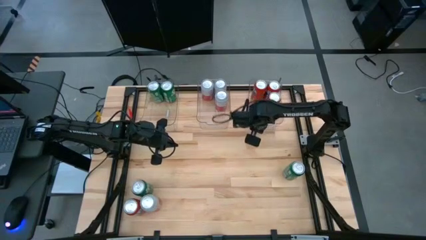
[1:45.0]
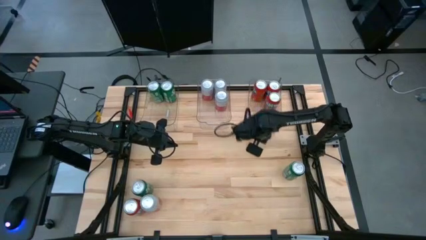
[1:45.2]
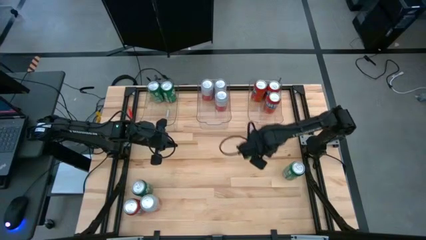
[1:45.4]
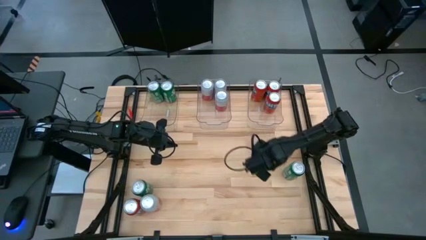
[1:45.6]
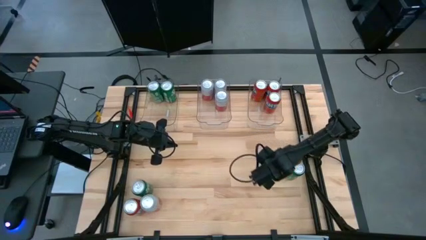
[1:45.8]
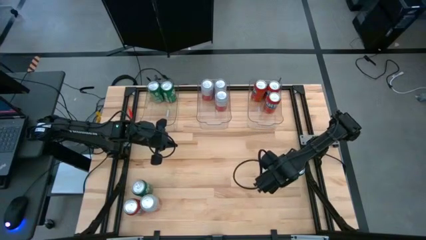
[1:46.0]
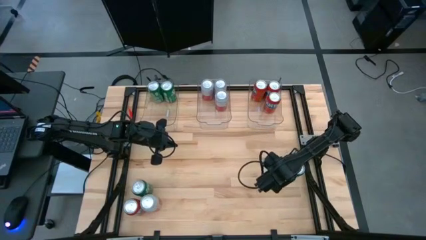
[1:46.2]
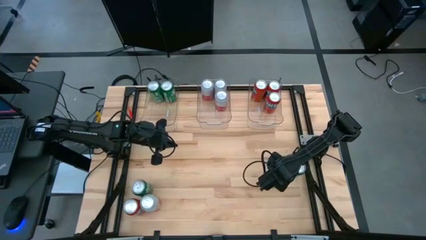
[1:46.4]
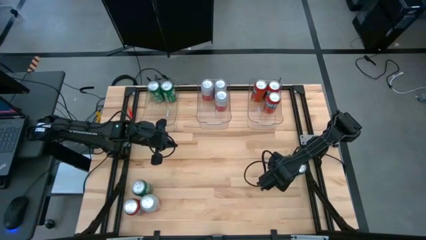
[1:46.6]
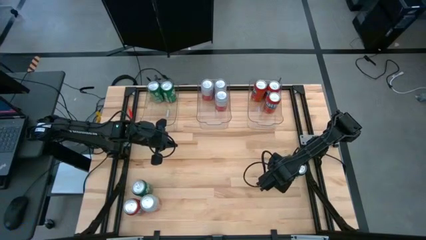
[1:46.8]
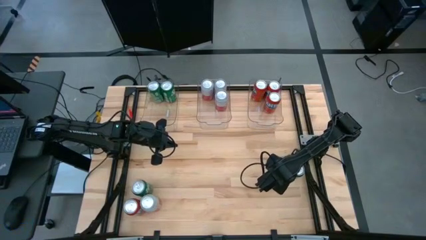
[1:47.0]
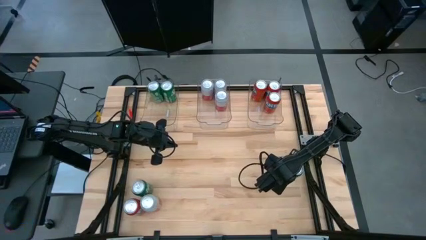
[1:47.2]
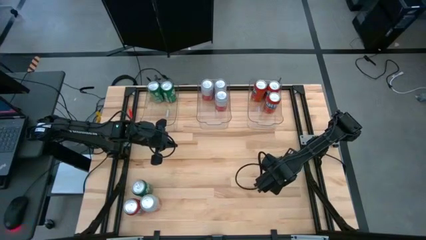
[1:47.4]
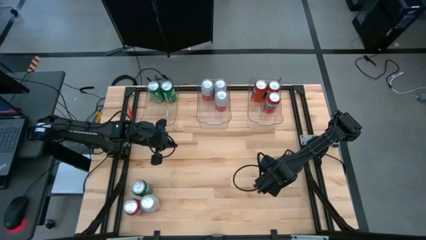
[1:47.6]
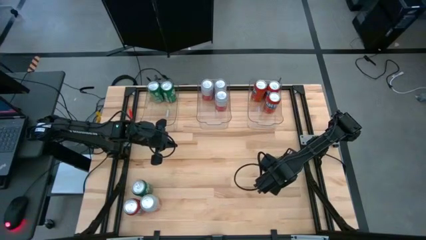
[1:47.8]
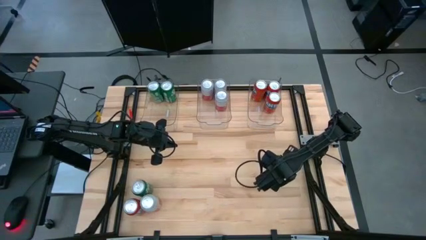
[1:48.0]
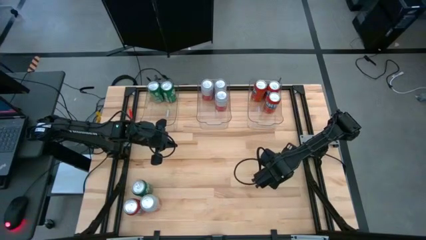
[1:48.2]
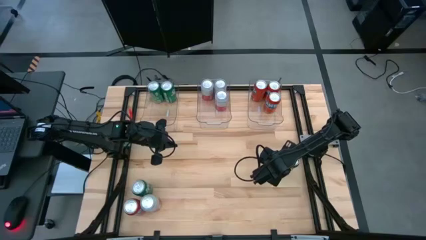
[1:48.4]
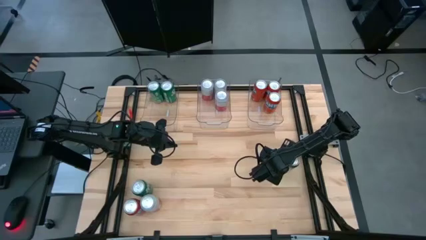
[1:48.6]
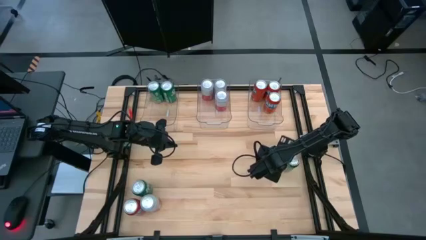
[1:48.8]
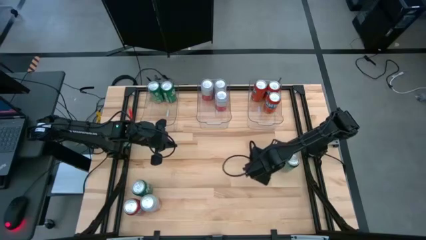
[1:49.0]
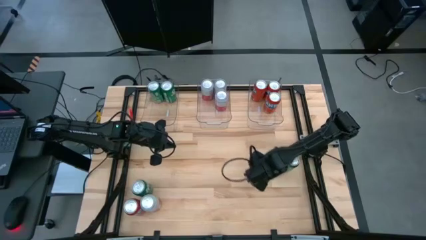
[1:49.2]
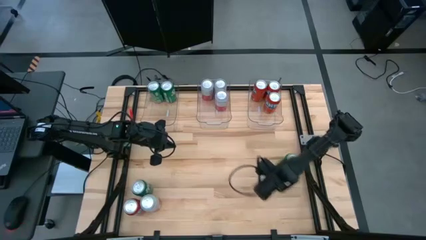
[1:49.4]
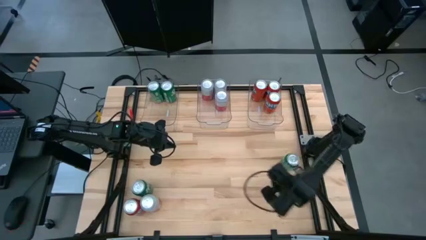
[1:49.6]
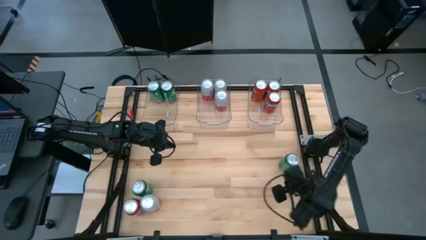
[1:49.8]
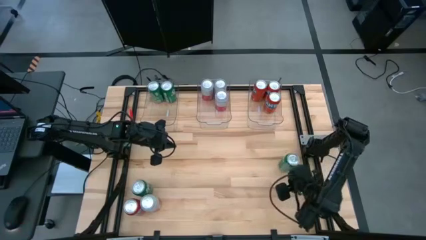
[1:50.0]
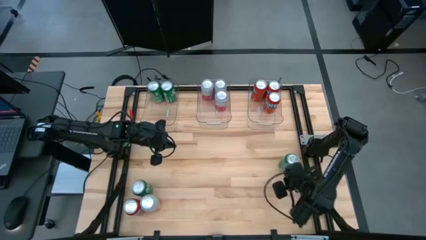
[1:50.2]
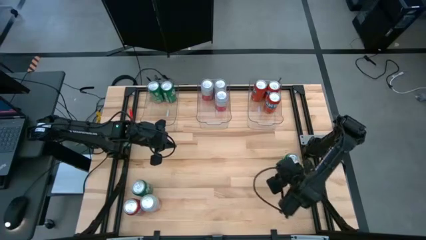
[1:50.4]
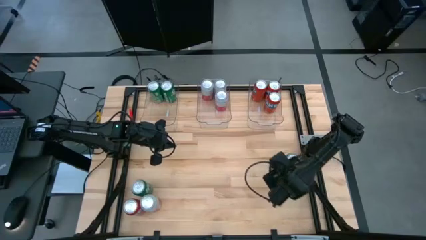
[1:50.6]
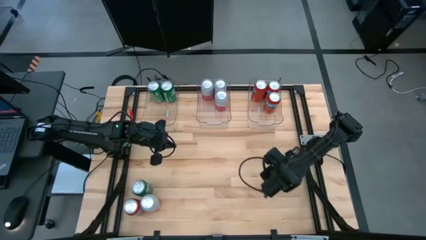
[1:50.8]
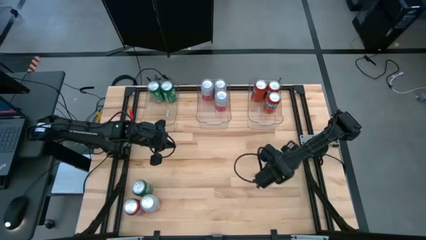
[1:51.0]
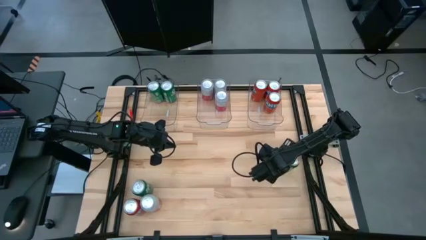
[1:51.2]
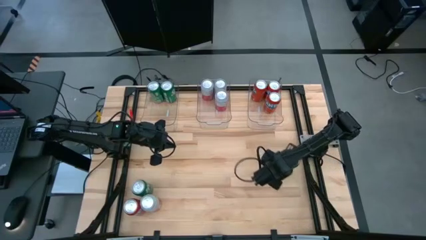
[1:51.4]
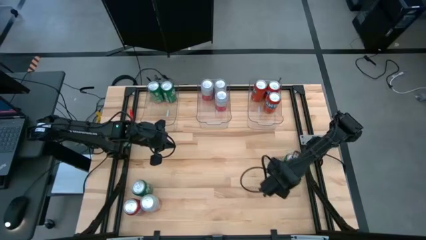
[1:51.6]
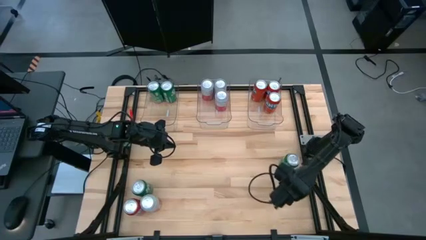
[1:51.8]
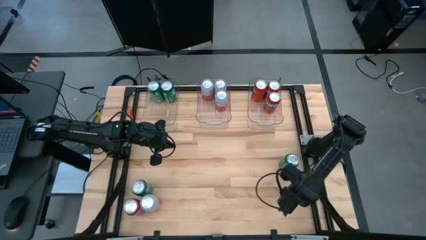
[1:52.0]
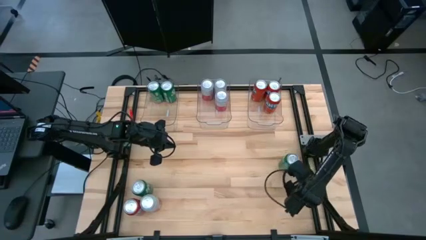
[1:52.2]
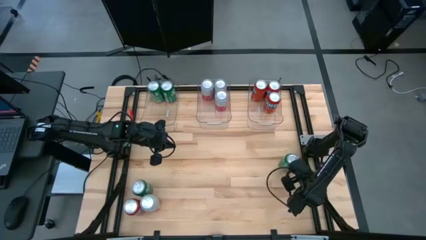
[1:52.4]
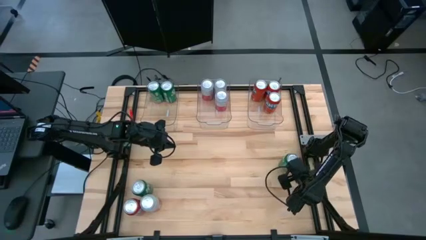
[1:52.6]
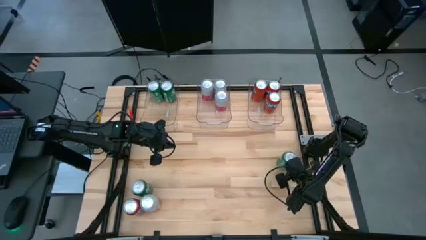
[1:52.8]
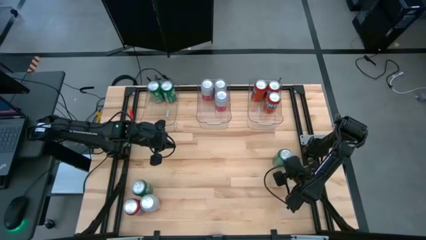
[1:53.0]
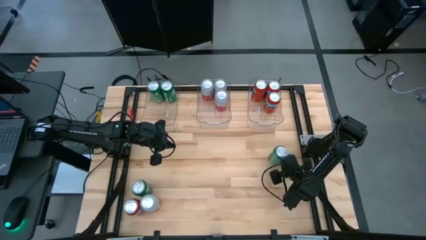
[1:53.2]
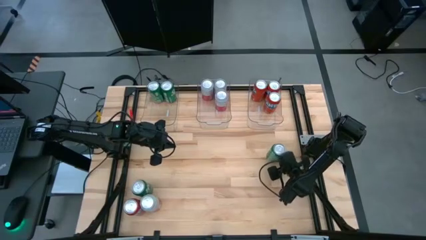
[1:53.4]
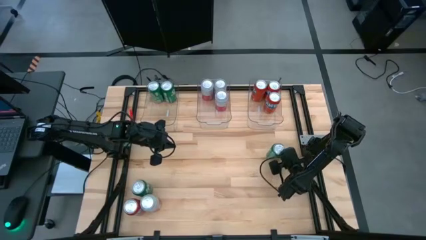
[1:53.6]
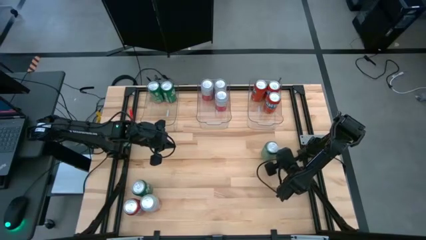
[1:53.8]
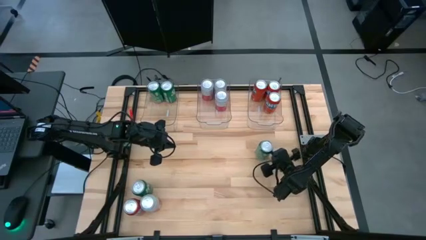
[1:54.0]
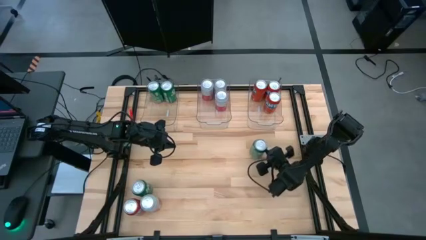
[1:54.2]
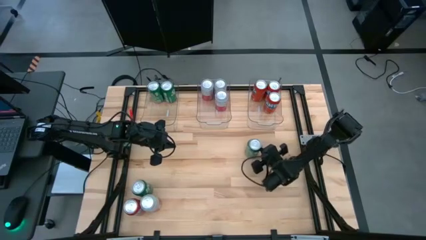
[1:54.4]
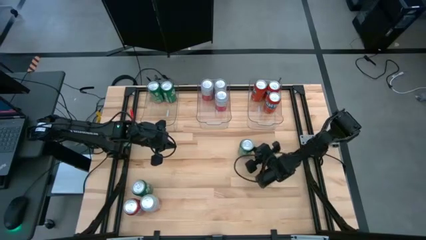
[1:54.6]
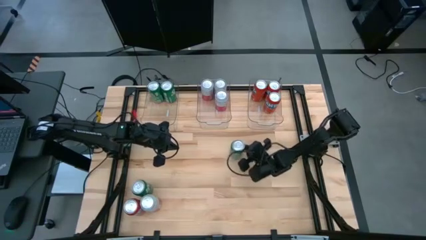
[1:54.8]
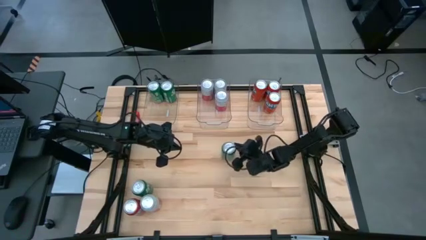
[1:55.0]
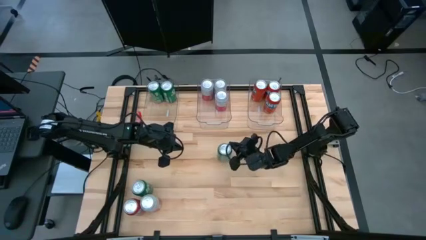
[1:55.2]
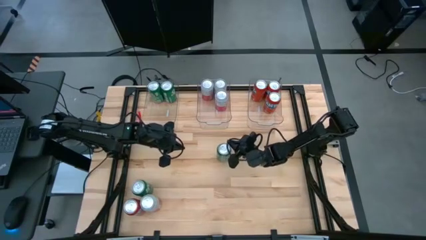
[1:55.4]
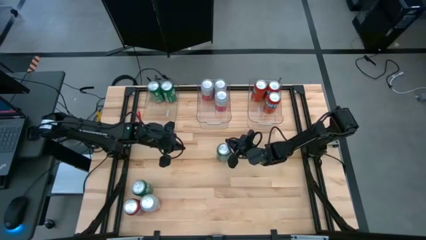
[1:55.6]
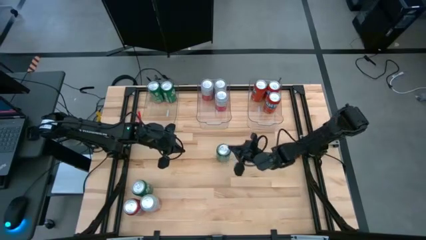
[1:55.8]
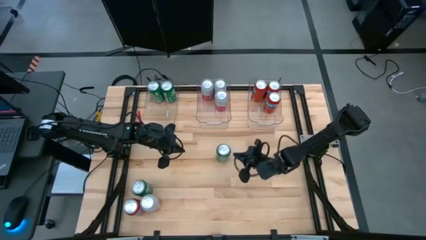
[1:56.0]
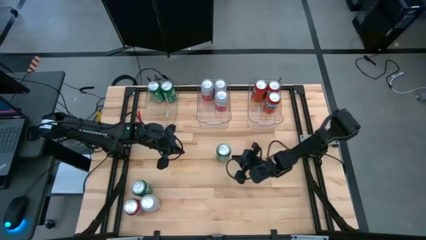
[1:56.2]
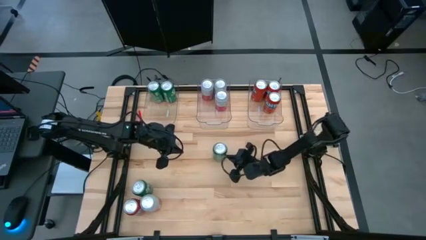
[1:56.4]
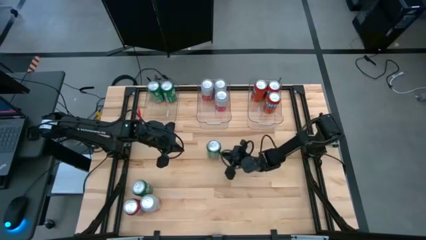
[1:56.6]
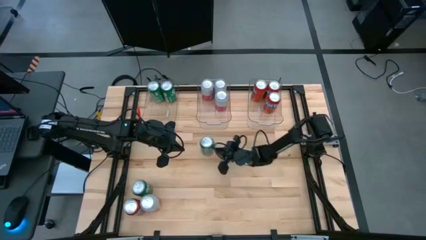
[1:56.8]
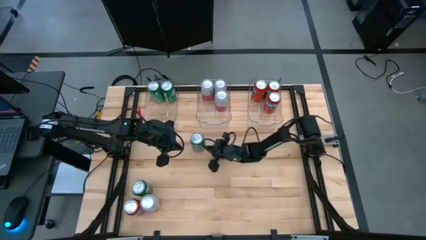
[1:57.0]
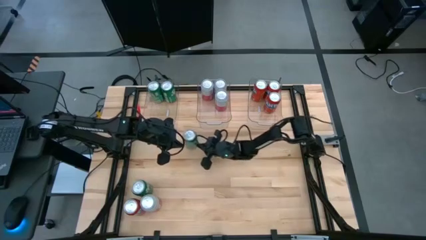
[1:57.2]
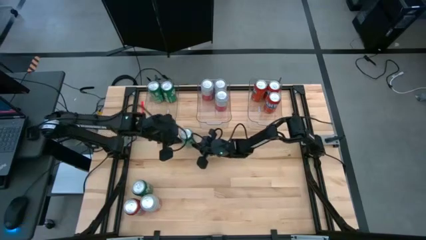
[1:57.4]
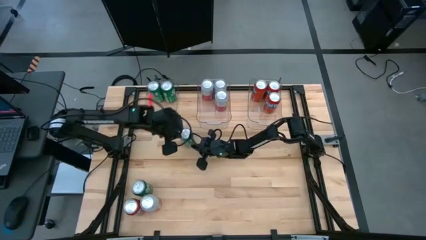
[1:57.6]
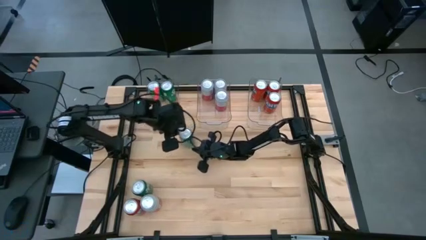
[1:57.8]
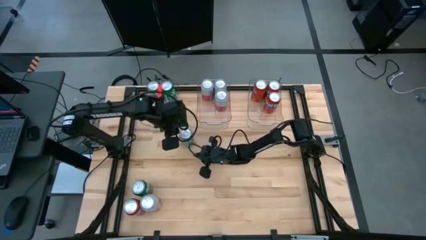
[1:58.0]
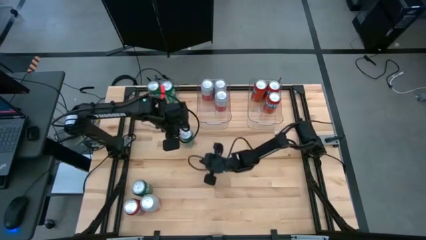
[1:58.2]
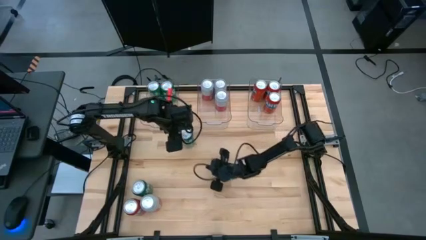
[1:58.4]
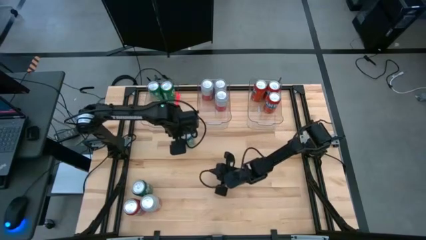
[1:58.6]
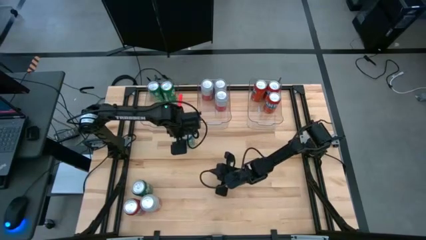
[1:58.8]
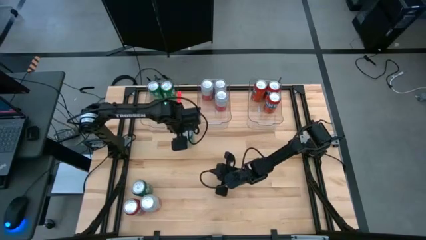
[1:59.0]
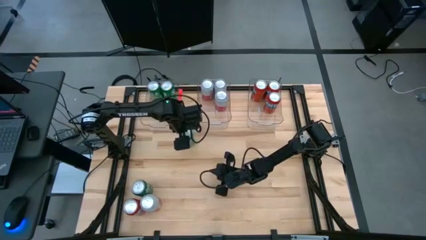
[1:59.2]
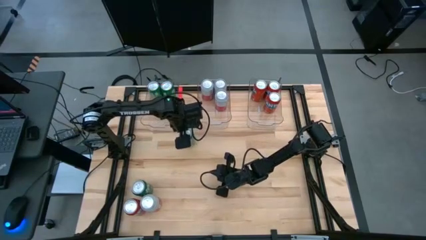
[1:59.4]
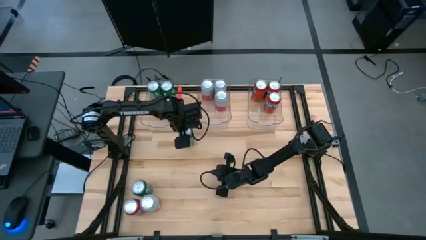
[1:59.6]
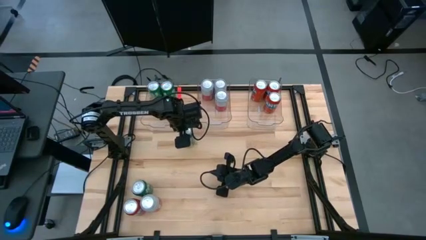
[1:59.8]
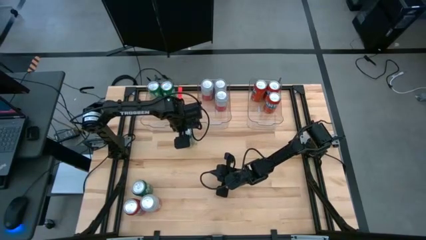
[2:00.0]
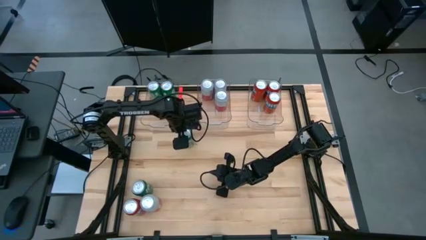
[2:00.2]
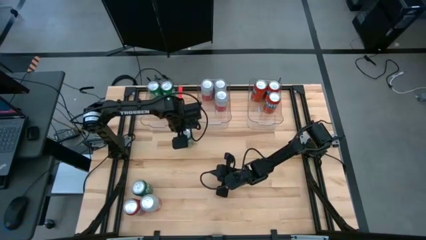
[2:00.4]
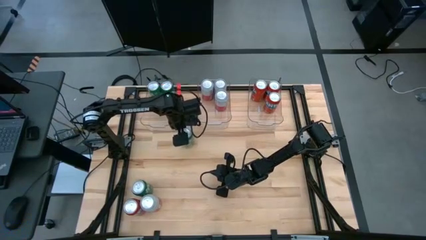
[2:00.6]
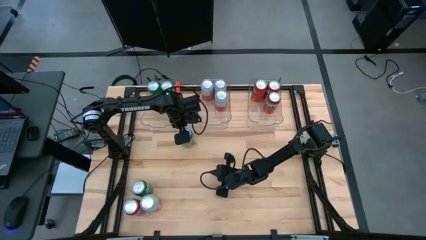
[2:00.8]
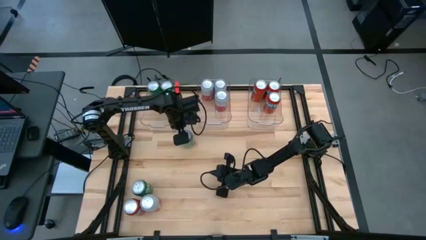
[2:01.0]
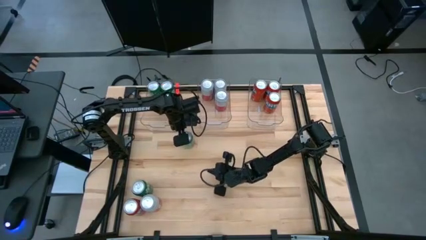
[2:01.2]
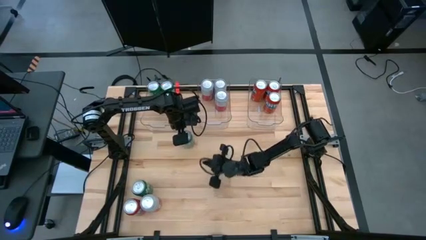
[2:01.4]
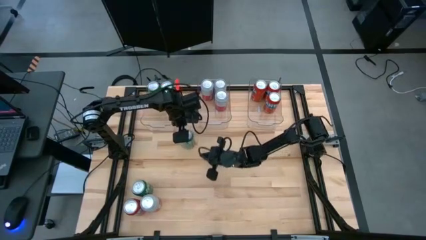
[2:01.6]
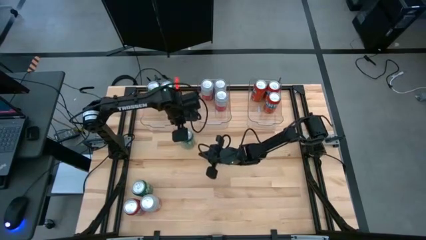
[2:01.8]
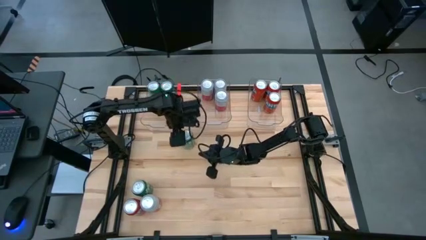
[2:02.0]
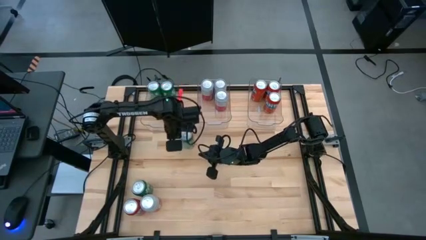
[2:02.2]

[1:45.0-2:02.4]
Task: Sort soda cans
Put the green soda can into the left transparent bin
